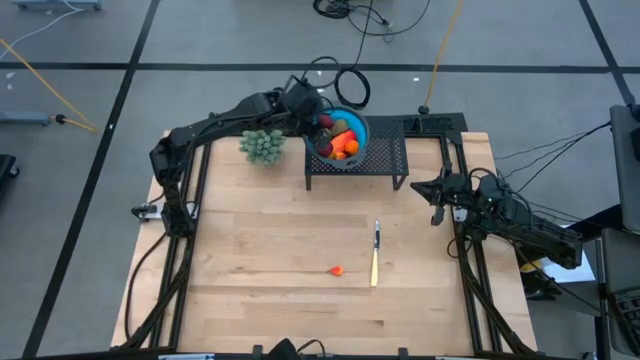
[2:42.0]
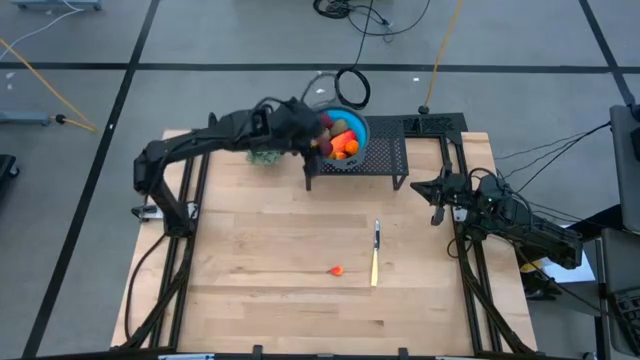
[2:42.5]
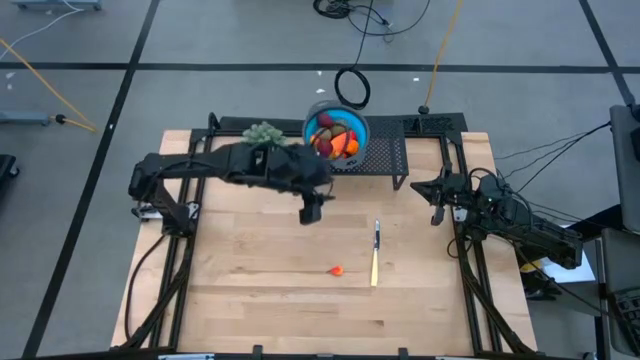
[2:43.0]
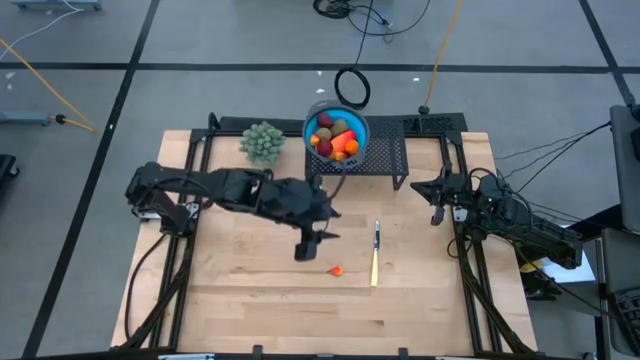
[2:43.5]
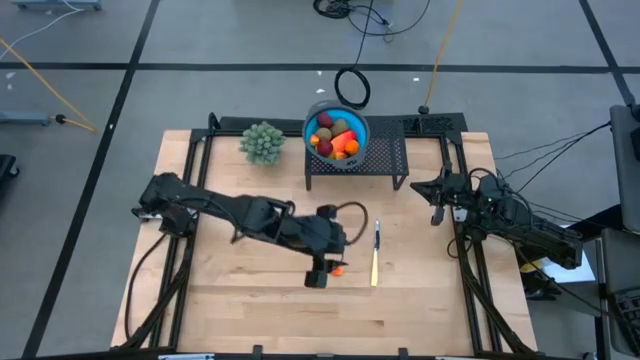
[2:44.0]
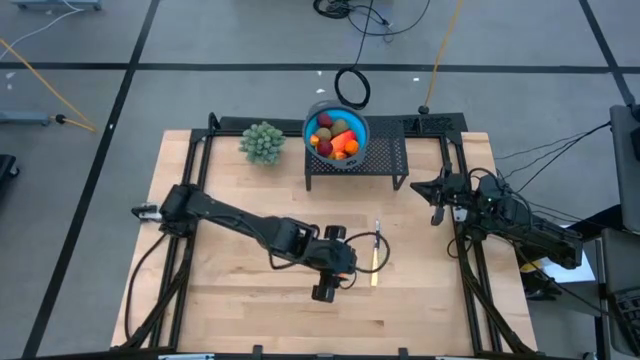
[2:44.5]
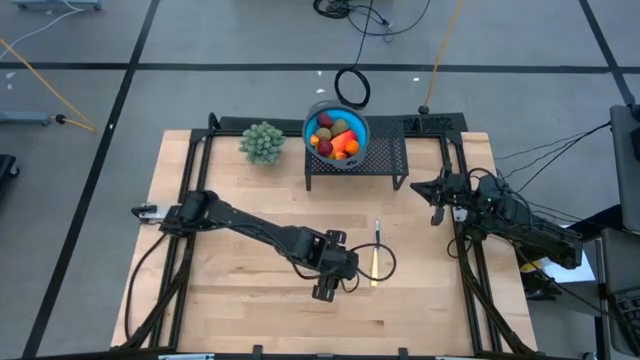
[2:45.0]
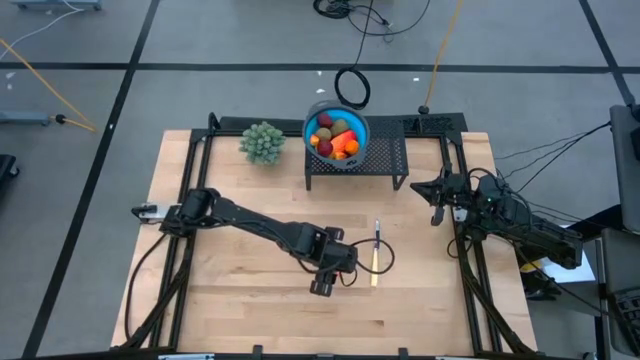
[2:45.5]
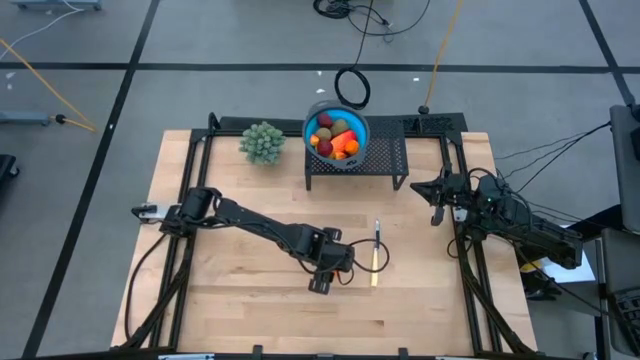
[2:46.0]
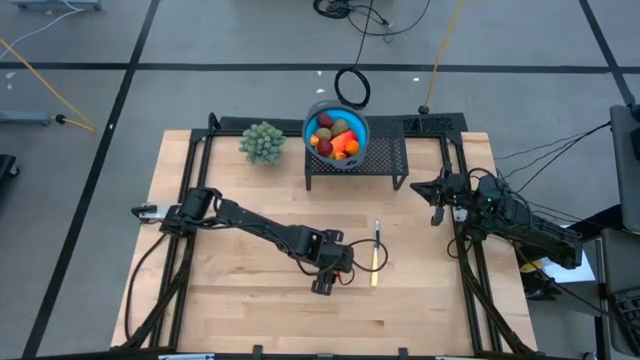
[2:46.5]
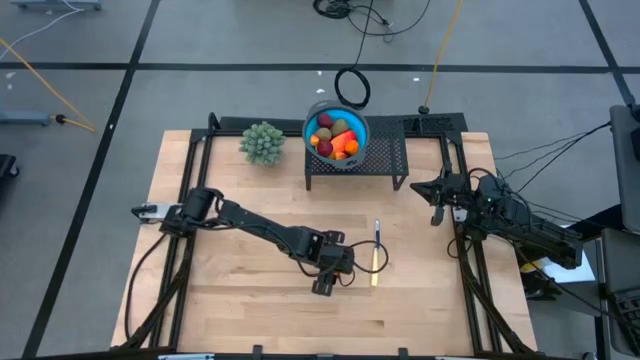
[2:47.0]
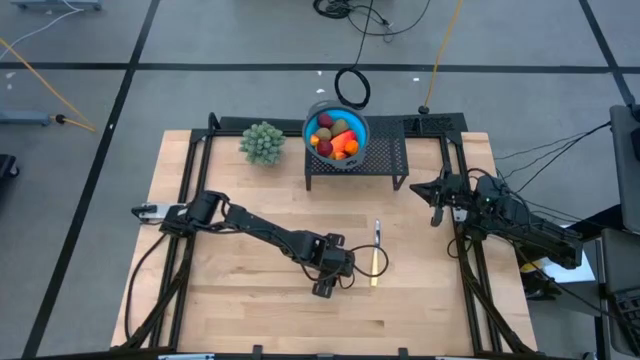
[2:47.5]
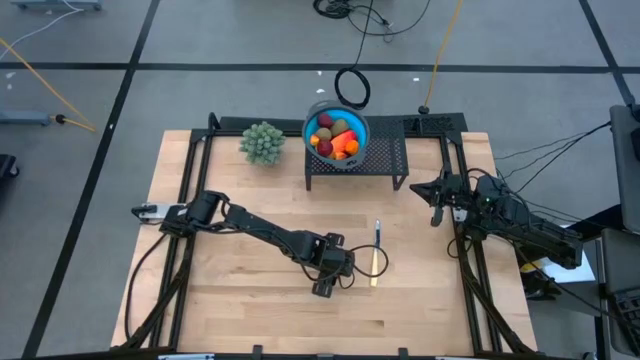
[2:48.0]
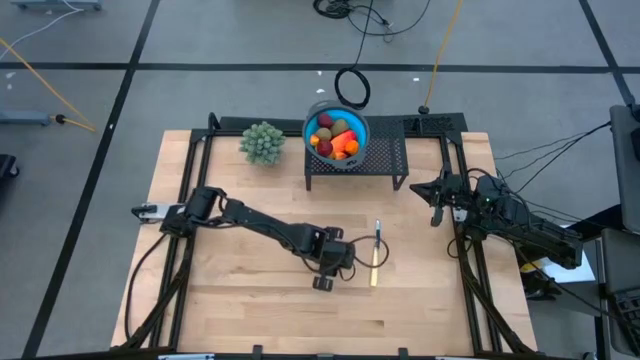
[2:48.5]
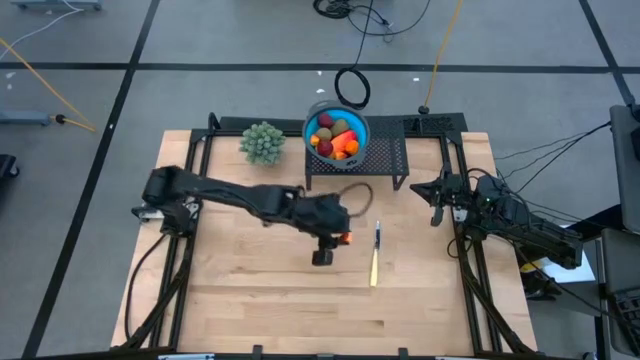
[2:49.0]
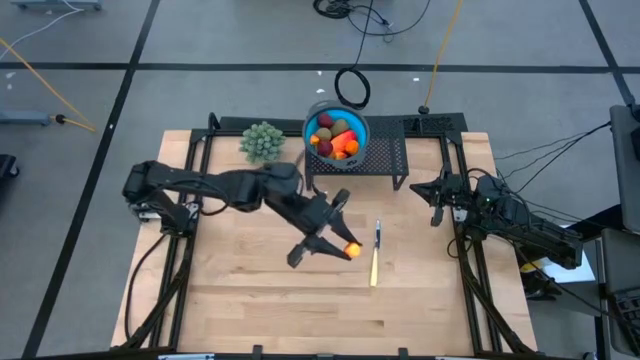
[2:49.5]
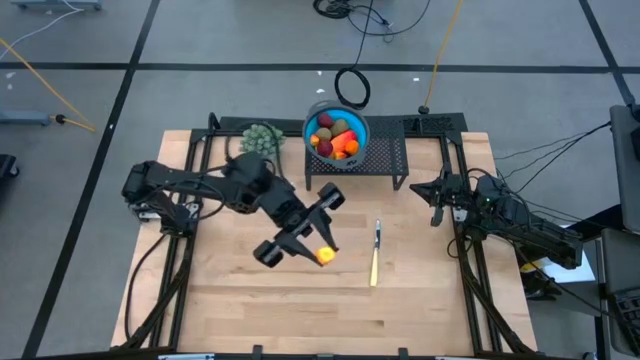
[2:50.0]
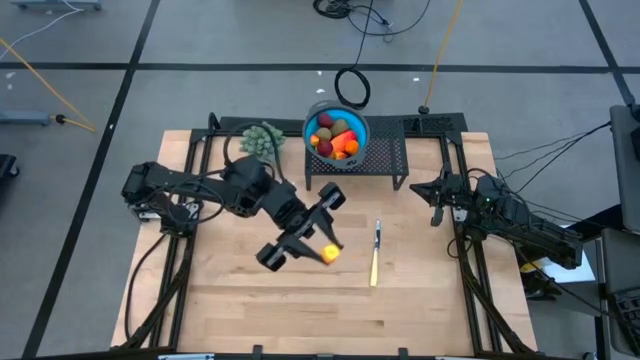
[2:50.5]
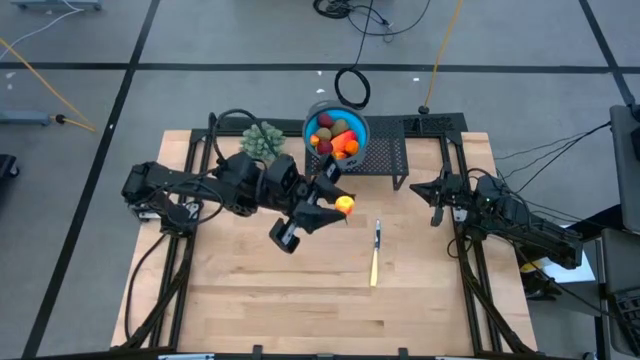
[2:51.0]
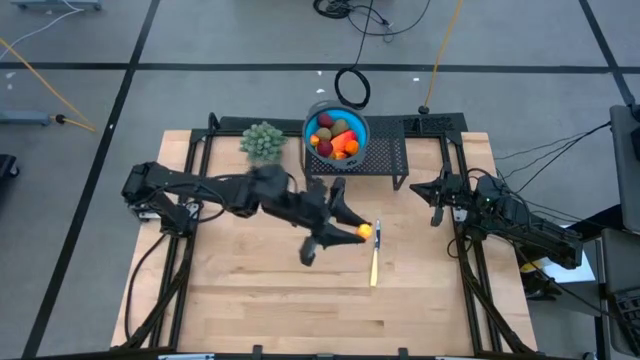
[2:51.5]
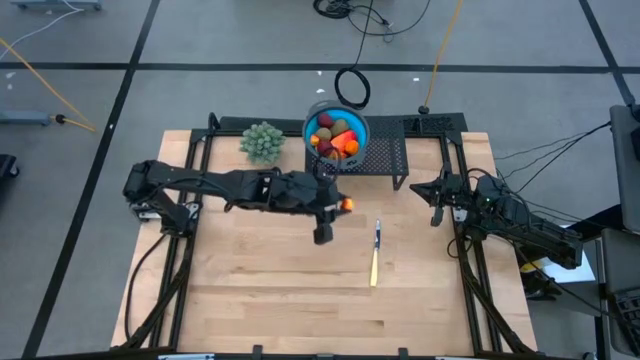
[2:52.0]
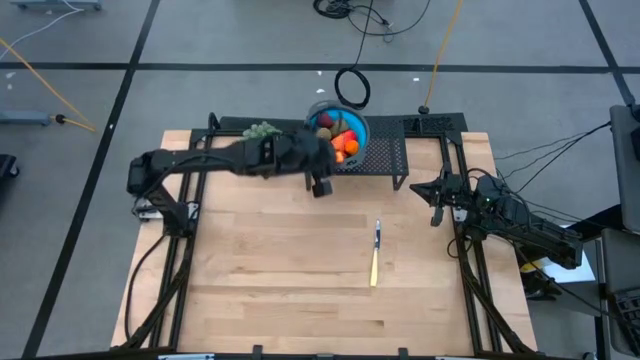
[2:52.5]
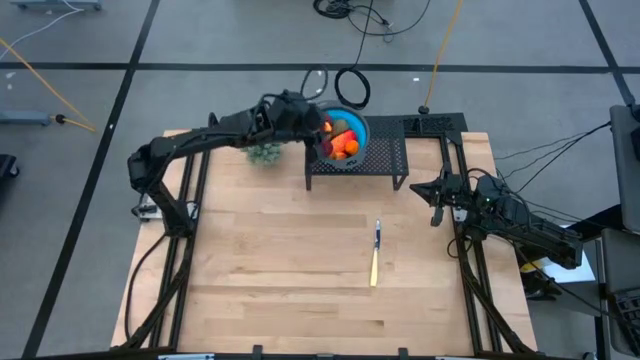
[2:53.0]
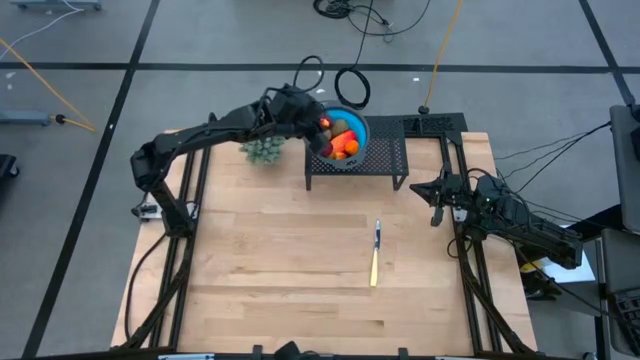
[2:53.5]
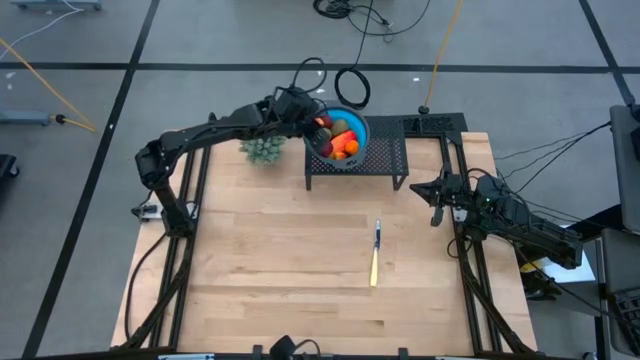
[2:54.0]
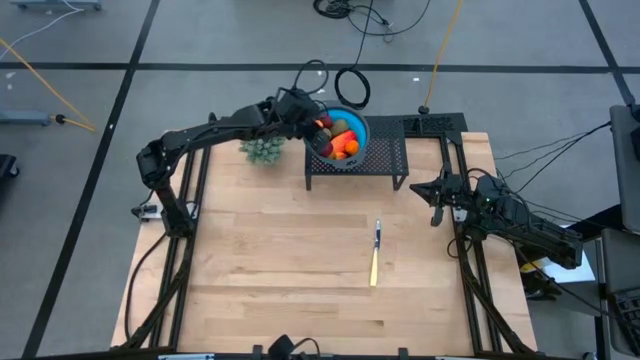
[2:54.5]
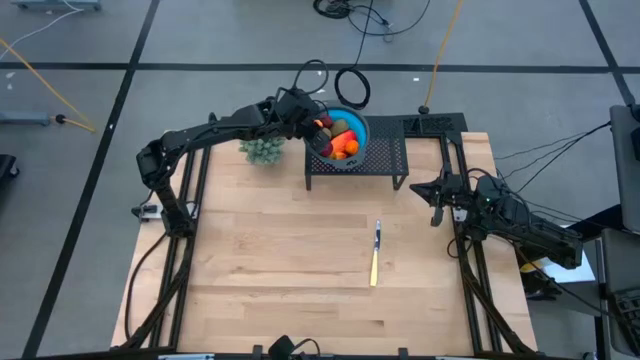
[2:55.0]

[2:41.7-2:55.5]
Task: Pick & Place Fruit
Put the orange peach into the blue strainer bowl on the shelf

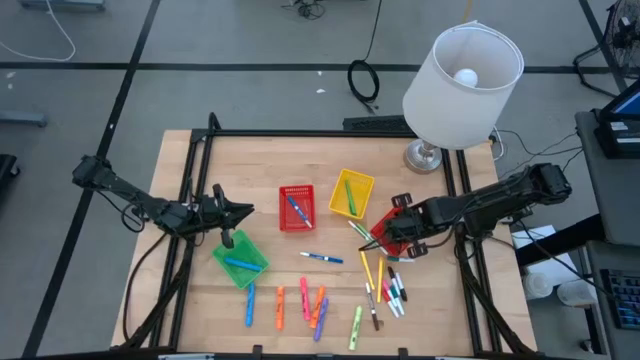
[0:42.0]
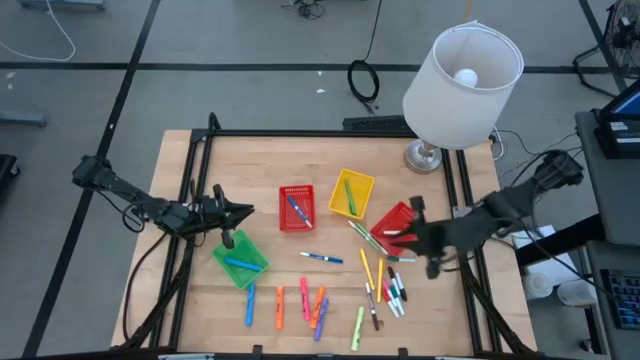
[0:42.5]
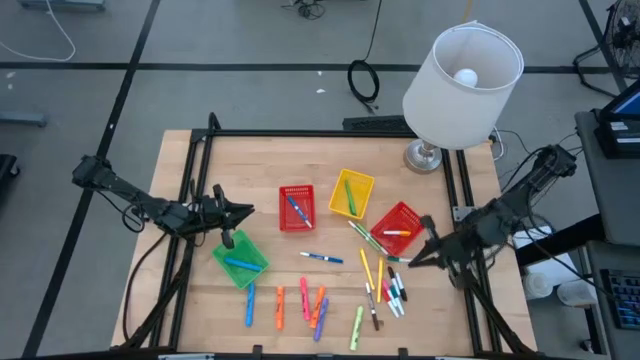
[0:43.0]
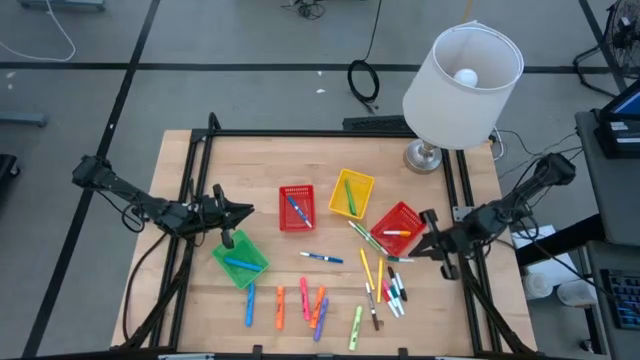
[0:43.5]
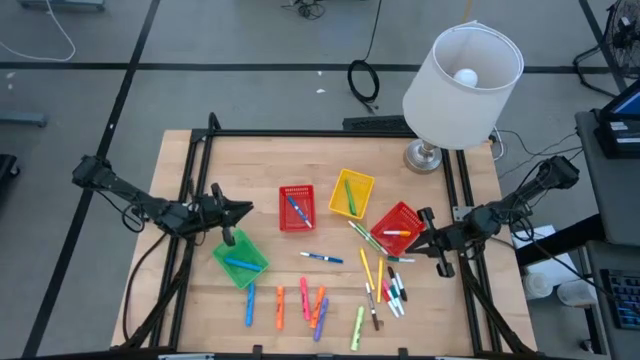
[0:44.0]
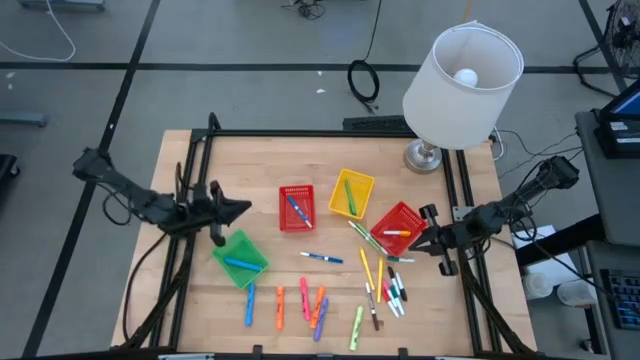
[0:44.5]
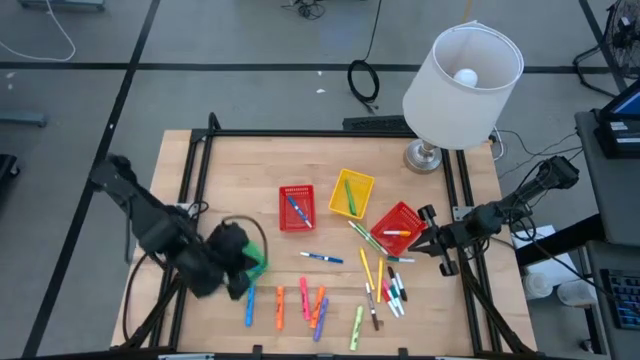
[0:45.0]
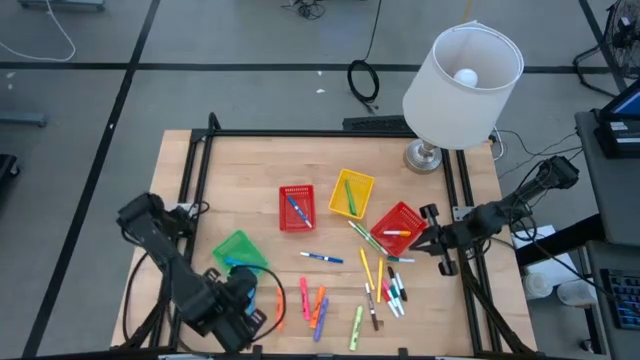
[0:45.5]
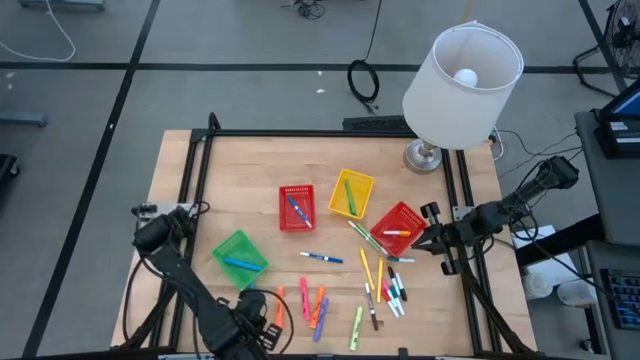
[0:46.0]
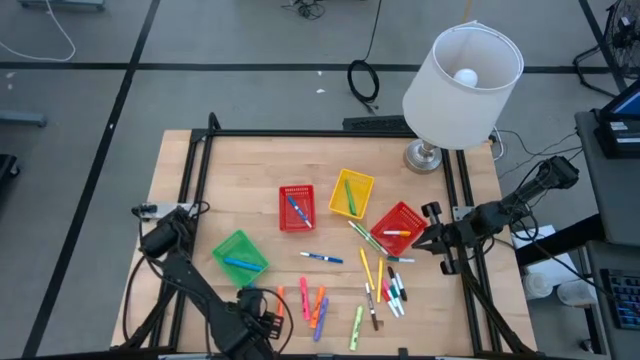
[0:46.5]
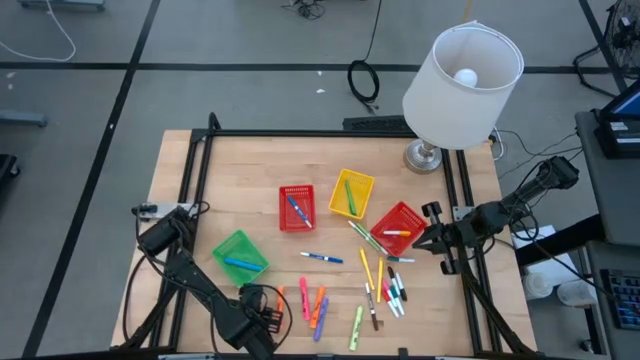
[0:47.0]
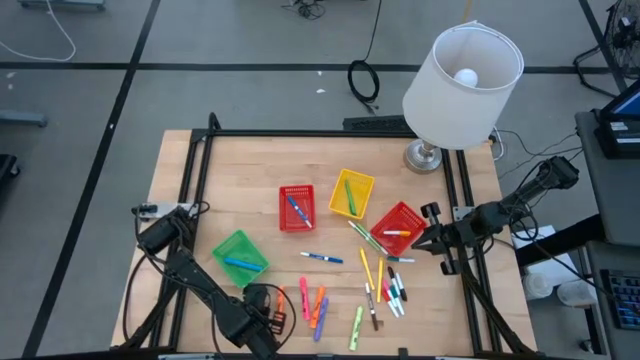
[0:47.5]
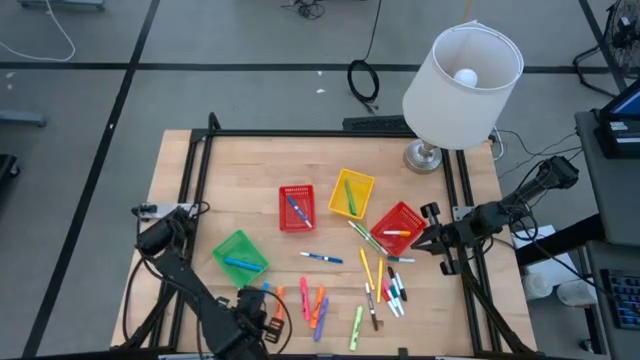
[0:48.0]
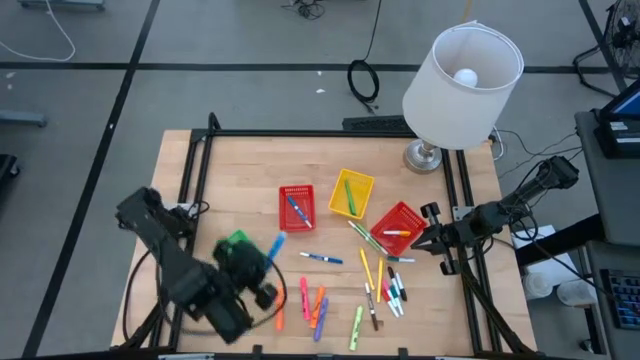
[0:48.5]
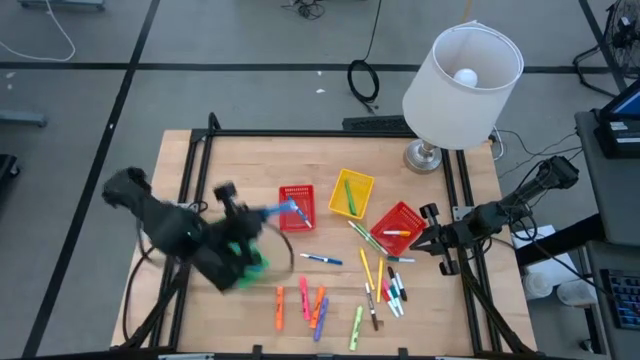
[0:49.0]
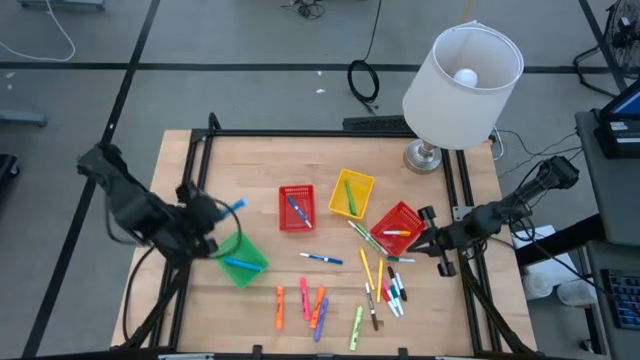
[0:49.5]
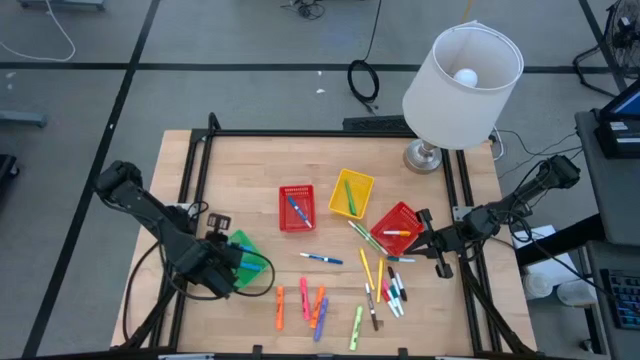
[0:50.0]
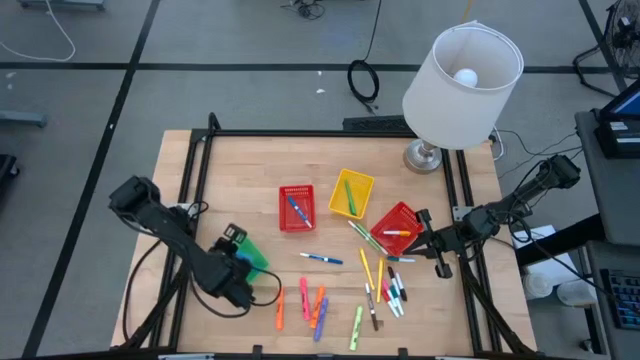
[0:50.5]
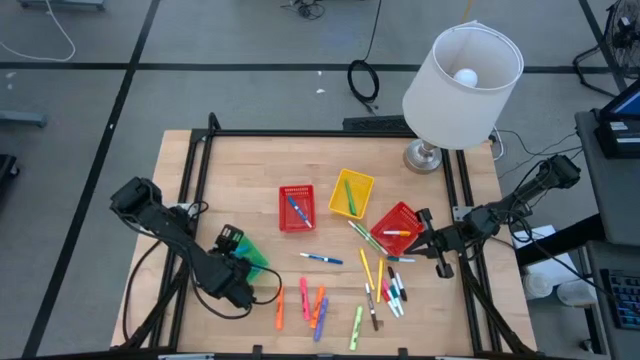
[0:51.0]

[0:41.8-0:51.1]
Task: Pick & Place Markers
Put the large blue highlighter pen into the green bin
